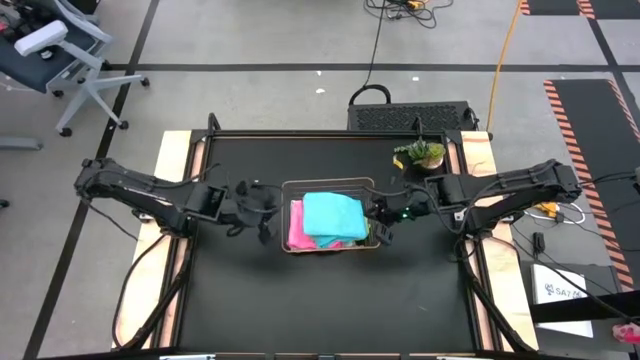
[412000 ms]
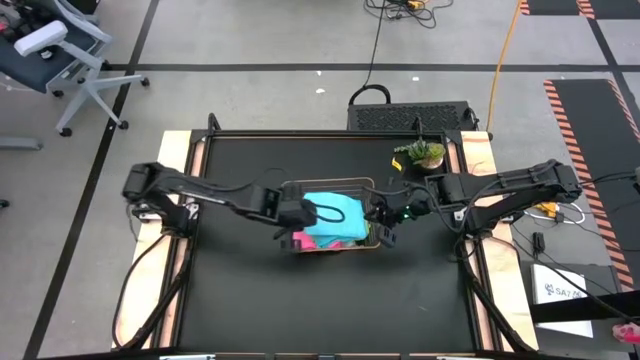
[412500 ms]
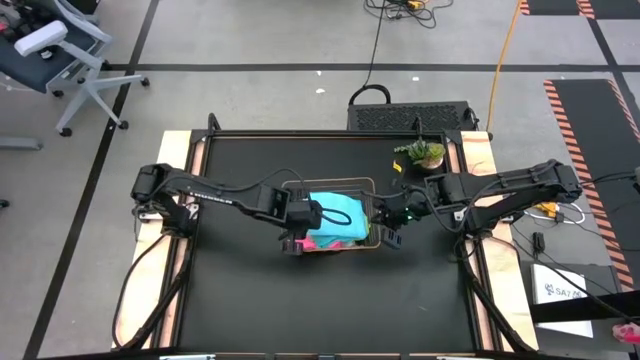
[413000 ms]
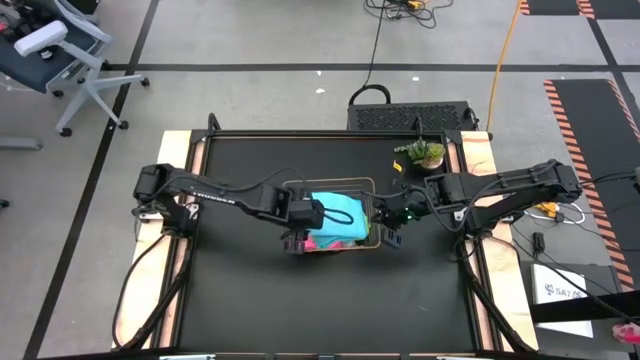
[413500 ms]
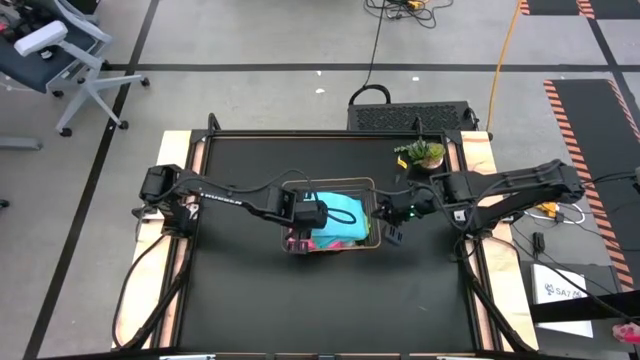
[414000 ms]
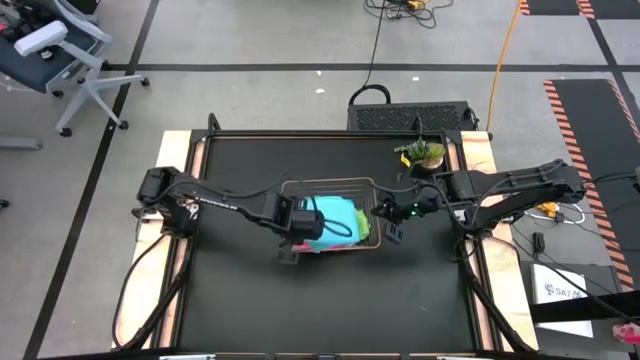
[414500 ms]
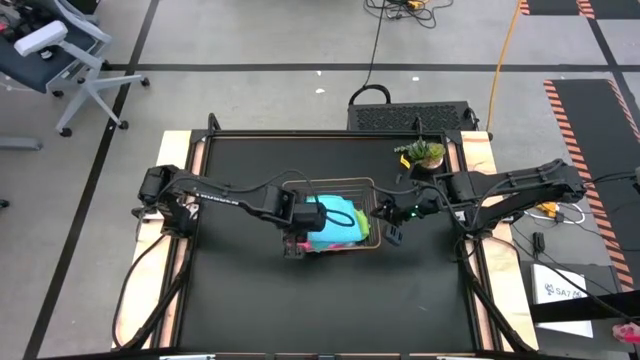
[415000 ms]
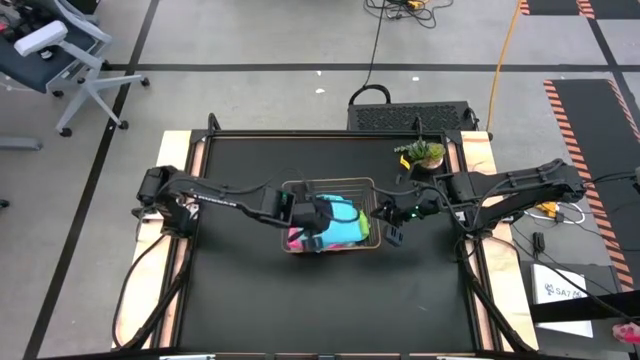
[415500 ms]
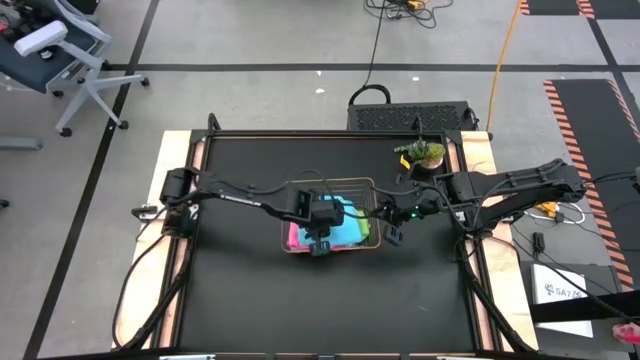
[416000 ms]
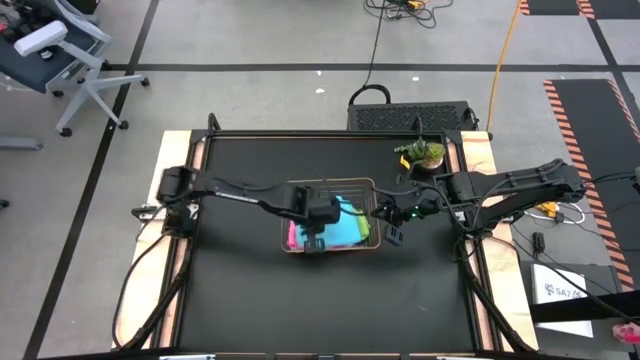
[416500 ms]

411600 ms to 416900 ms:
Task: Fold microfiber towels
Adjust the blue microfiber cloth

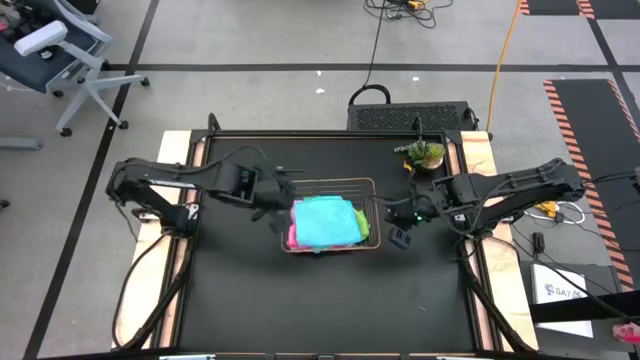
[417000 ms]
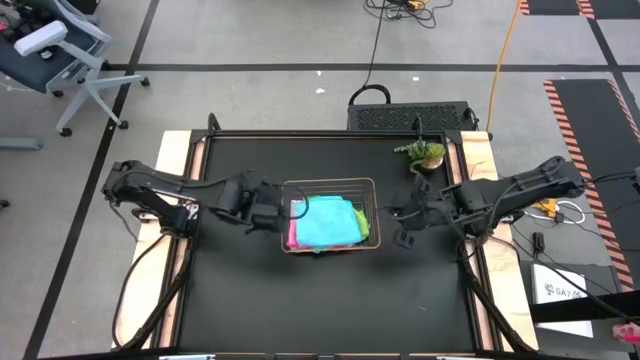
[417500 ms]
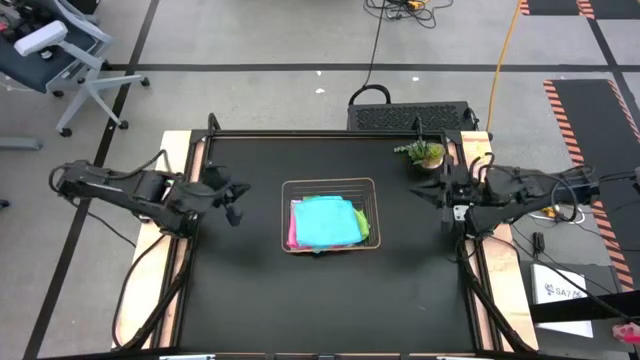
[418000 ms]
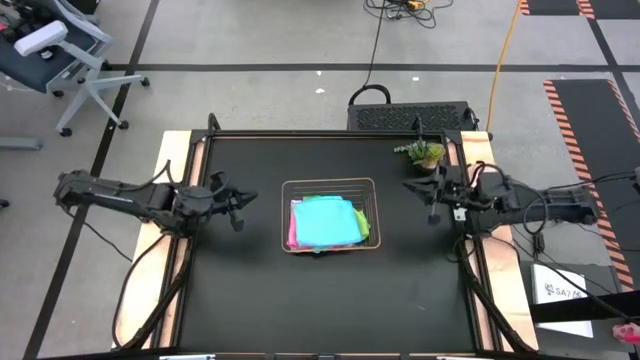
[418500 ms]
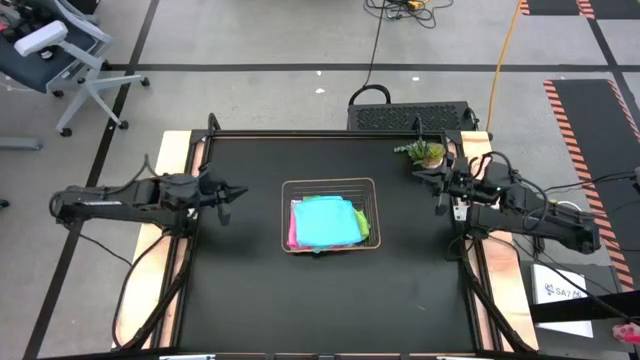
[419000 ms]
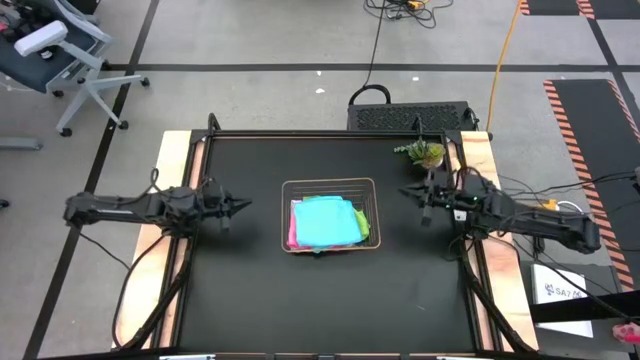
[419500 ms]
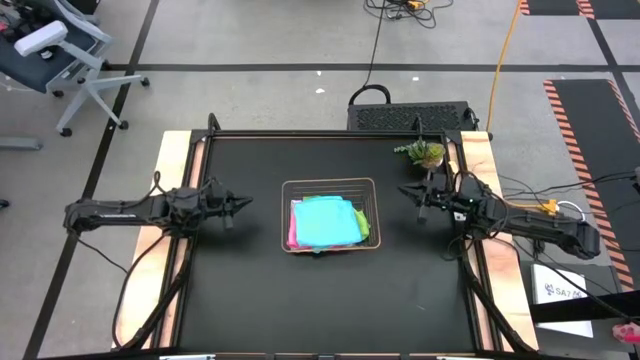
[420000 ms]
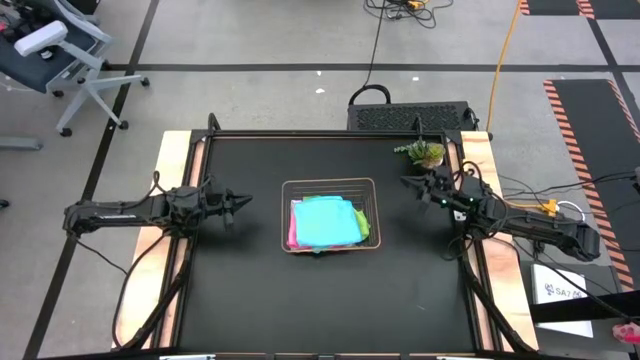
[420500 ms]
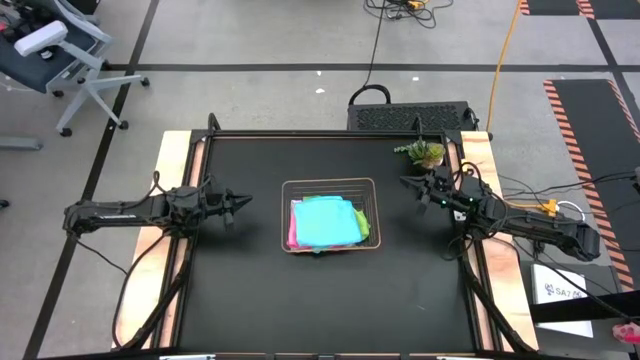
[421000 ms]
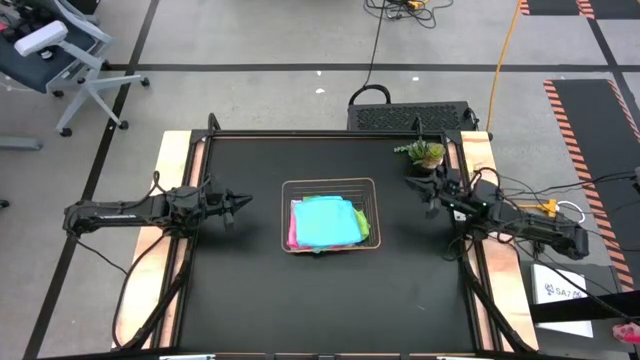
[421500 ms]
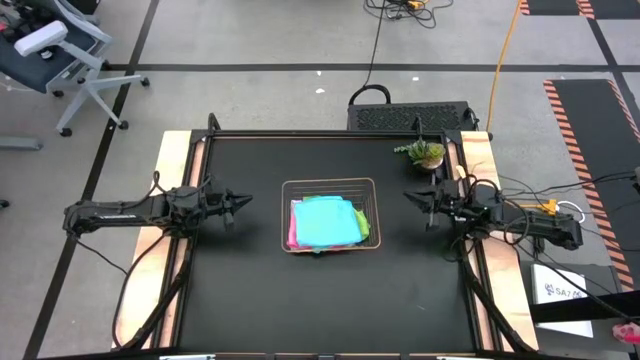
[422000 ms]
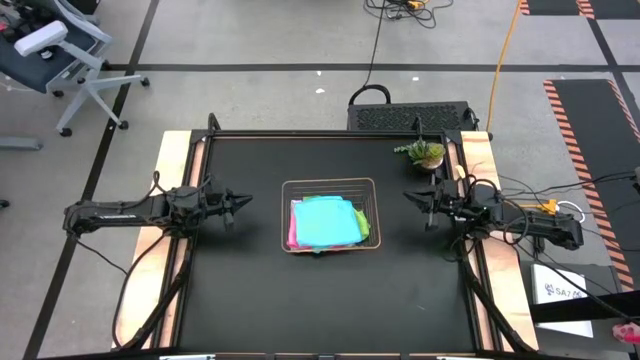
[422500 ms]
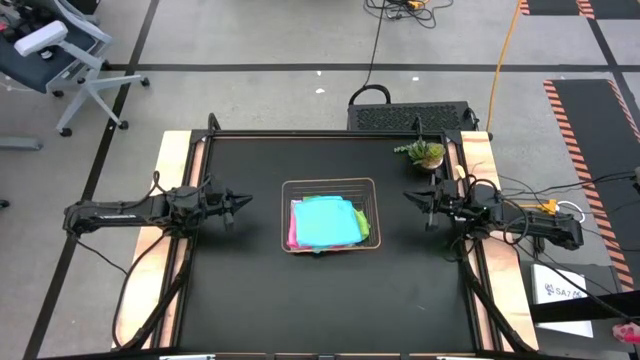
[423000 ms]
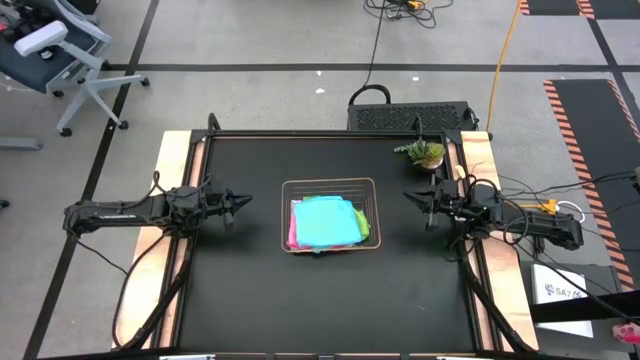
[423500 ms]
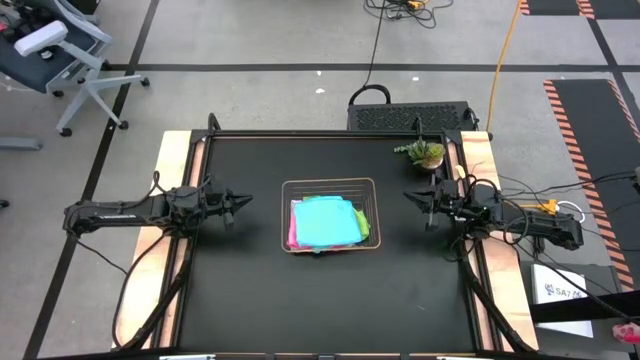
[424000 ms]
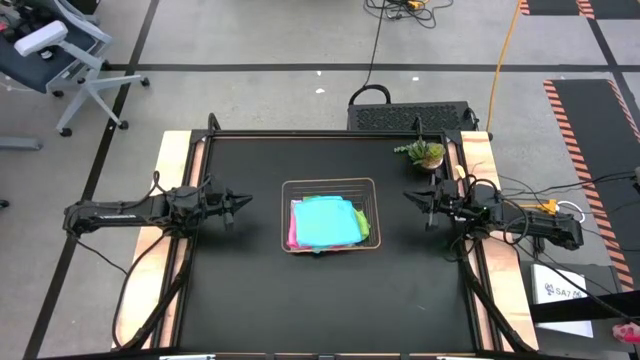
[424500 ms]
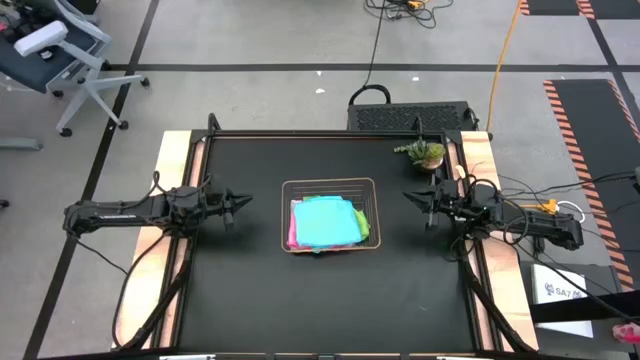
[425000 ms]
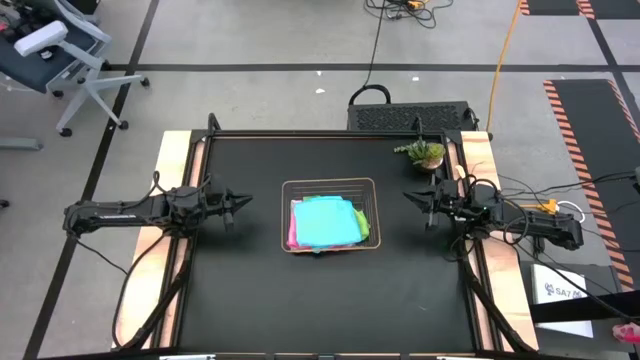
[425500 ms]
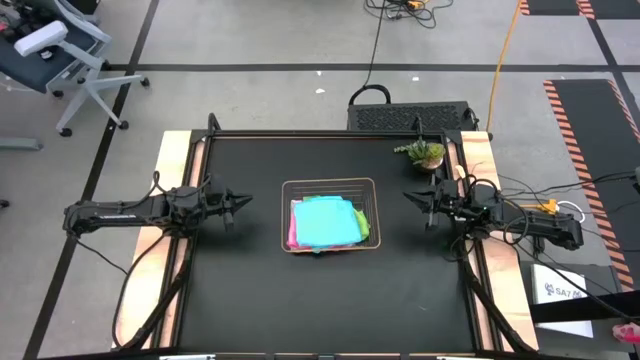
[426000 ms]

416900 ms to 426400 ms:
Return to Home Position

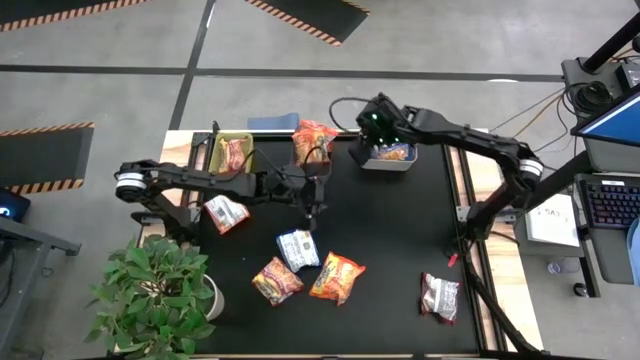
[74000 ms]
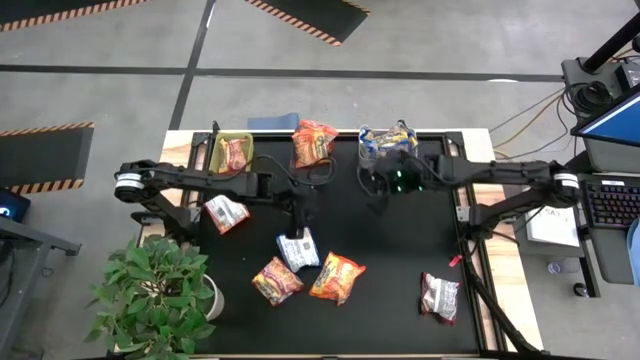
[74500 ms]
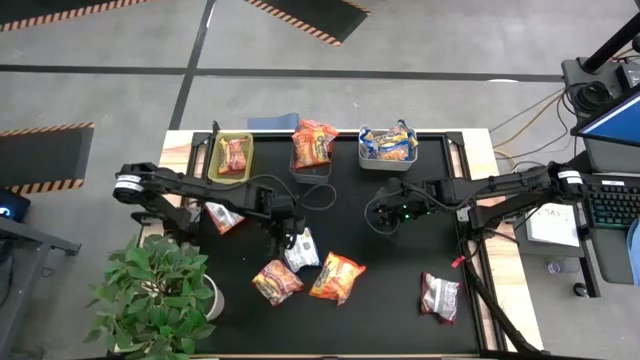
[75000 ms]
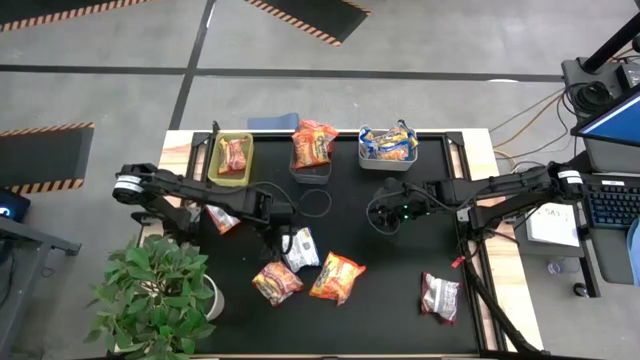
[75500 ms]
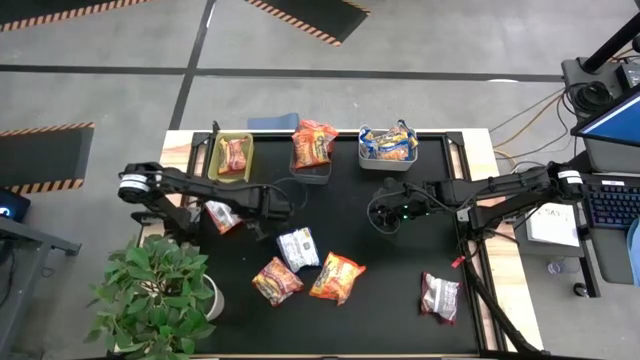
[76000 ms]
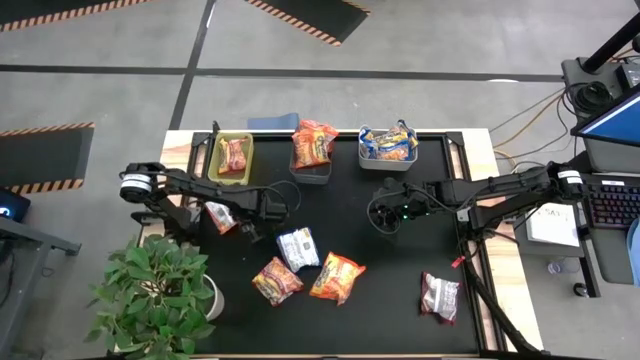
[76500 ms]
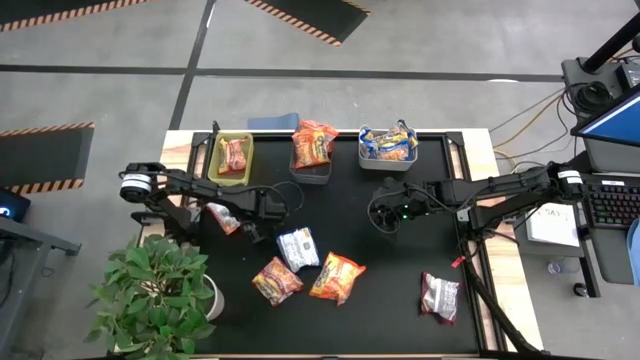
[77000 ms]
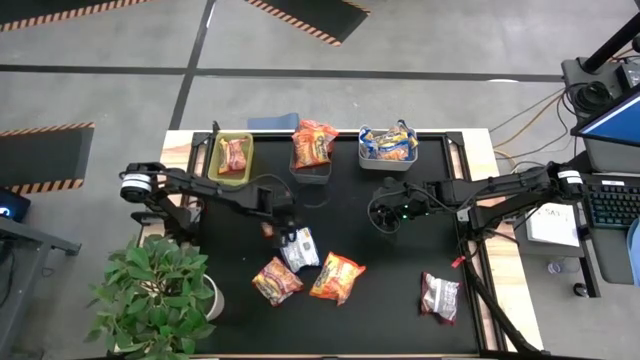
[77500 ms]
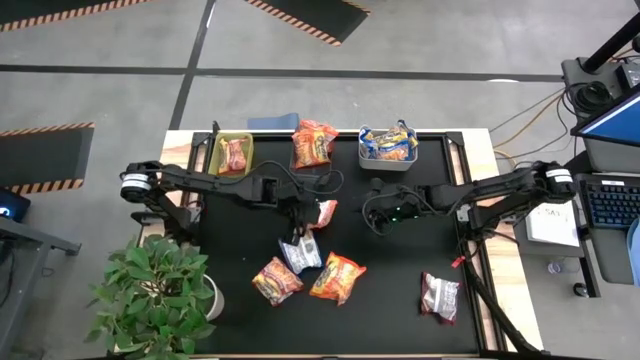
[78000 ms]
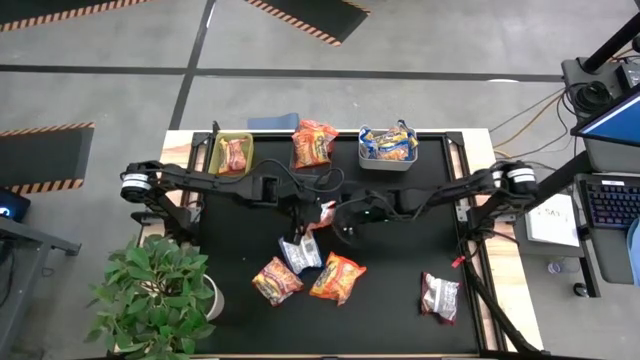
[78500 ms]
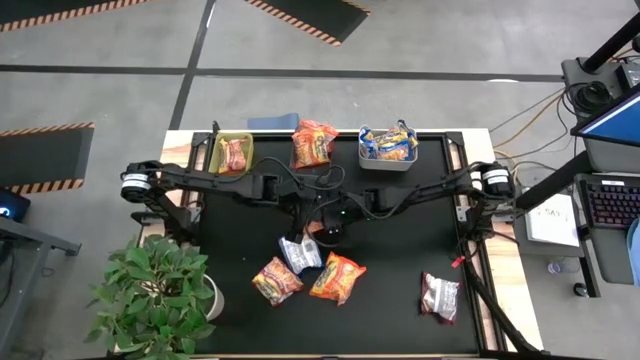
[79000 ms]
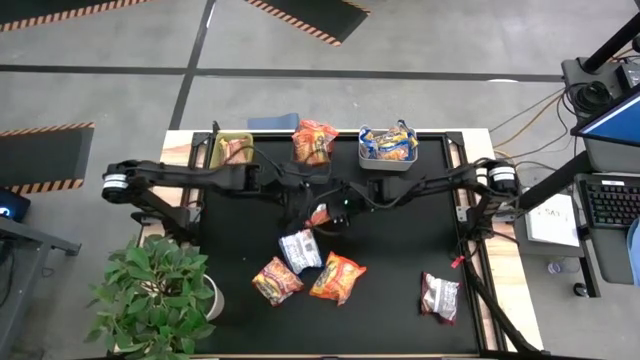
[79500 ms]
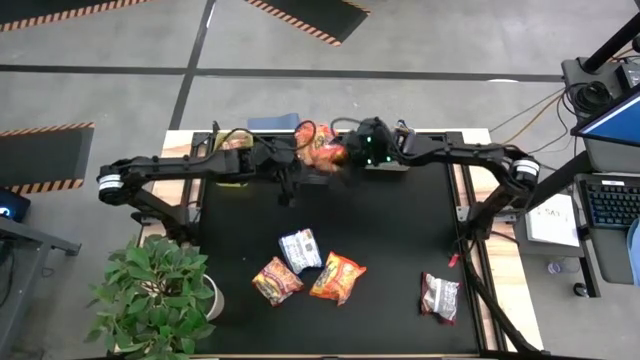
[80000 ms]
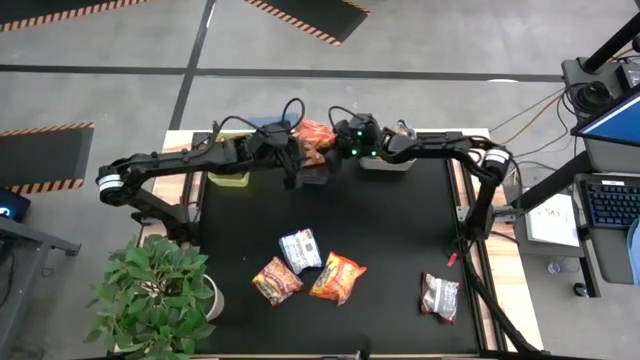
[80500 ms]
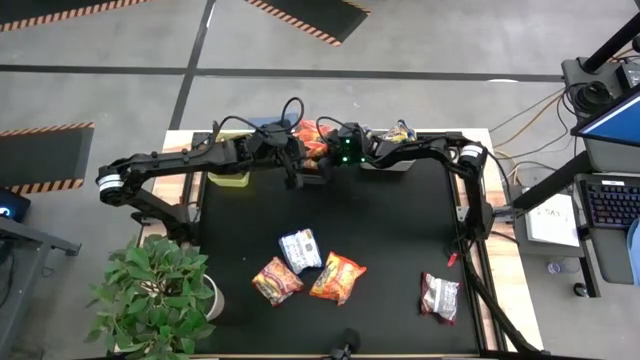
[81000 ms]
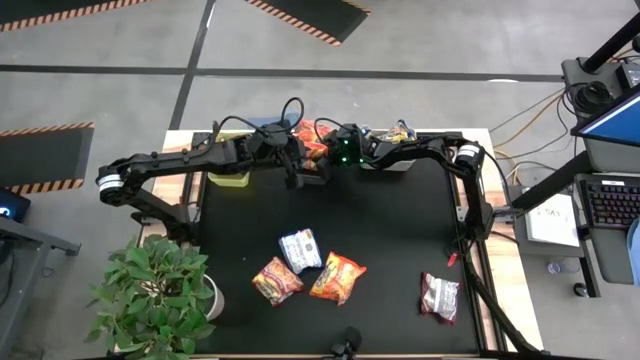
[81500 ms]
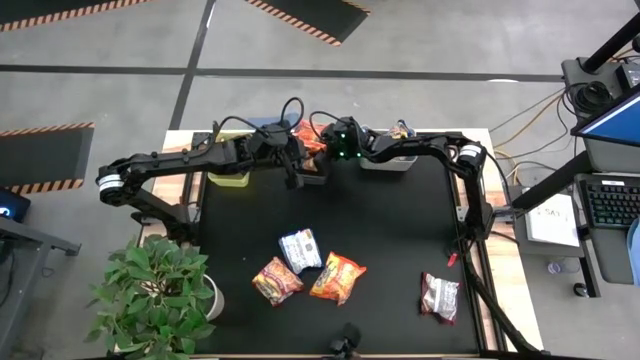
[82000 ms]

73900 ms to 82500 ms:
Task: Sort Maruchan noodles
Put the orange noodle pack into the black bin
